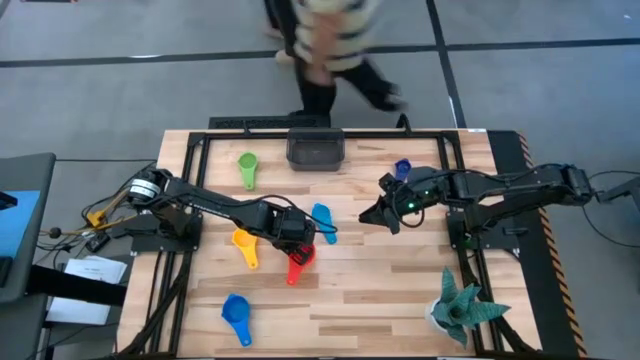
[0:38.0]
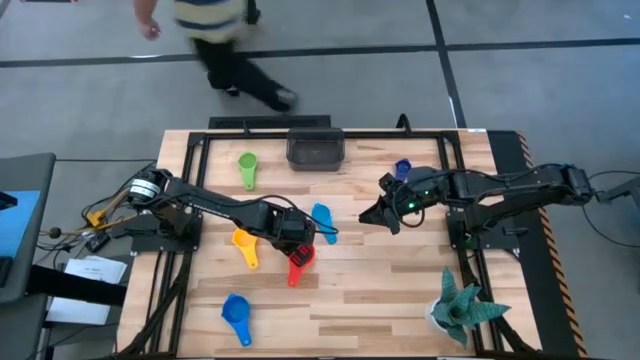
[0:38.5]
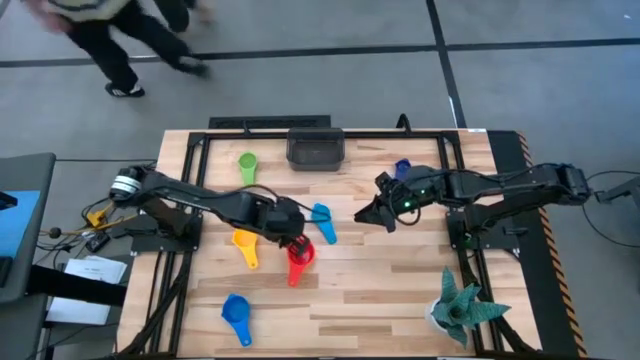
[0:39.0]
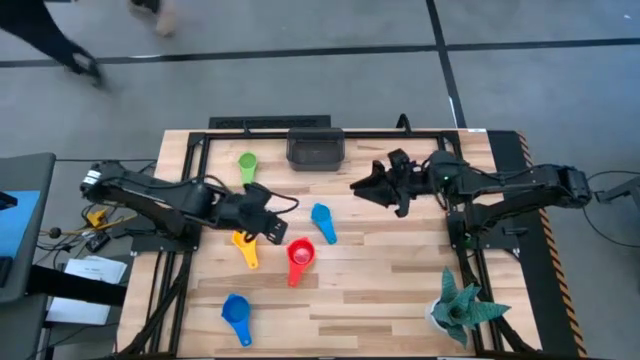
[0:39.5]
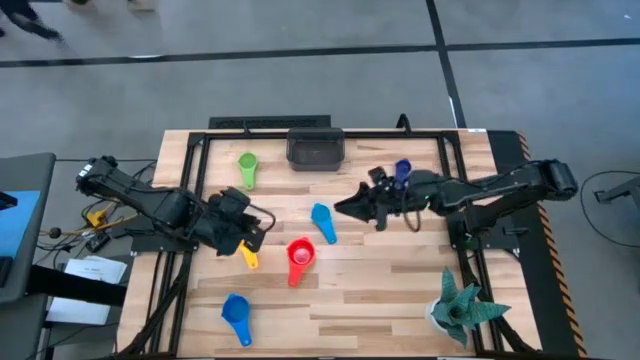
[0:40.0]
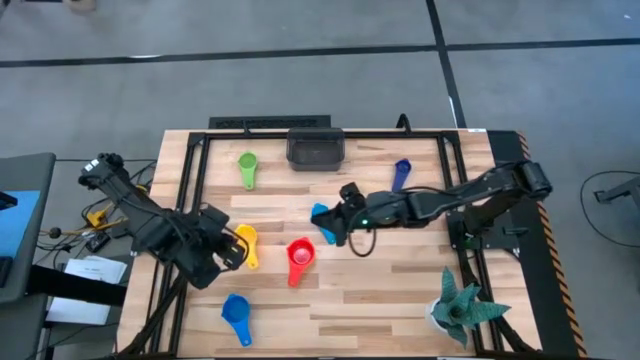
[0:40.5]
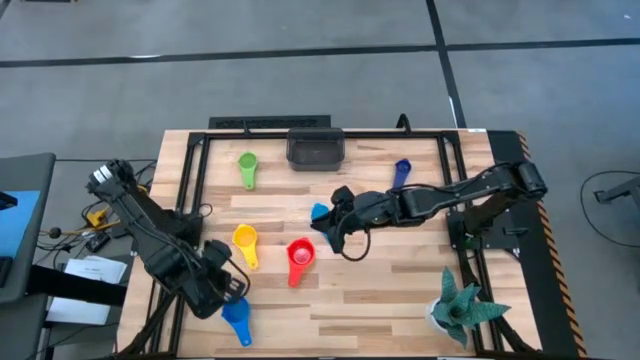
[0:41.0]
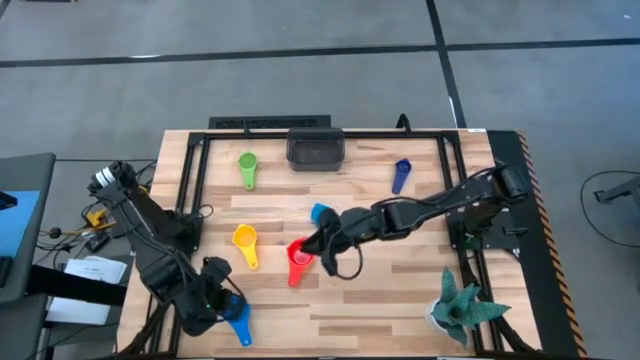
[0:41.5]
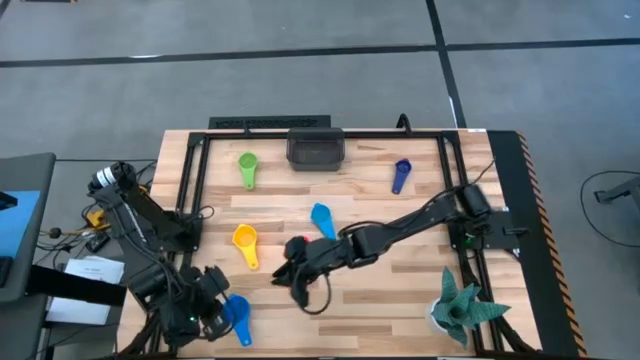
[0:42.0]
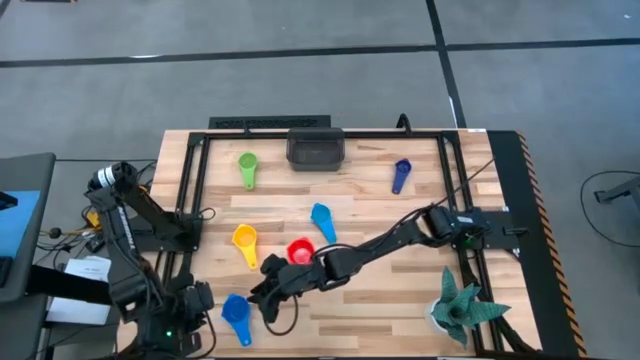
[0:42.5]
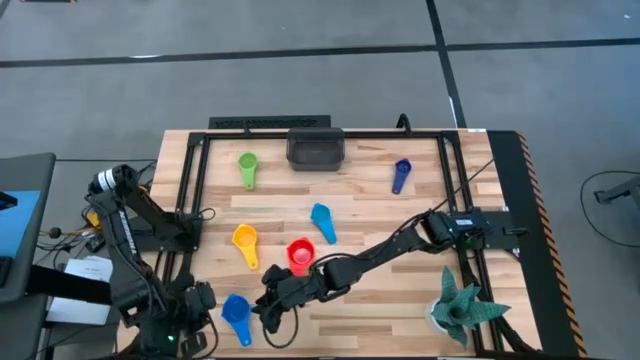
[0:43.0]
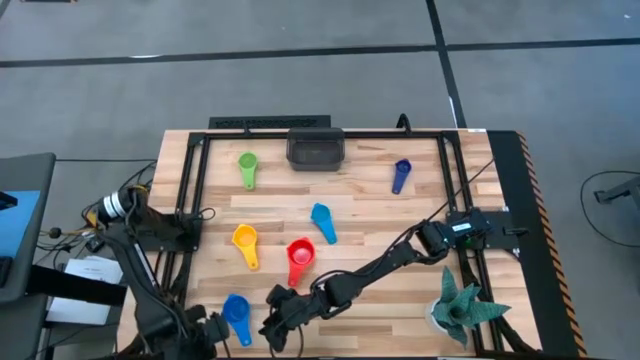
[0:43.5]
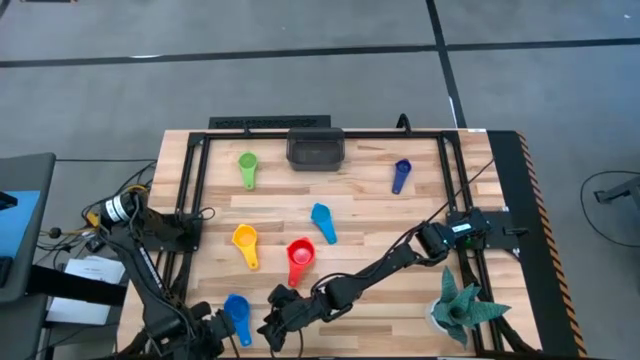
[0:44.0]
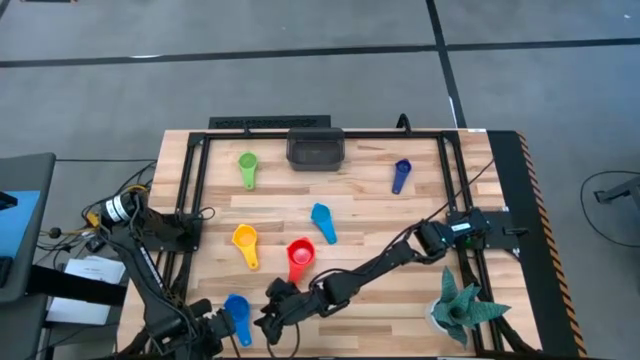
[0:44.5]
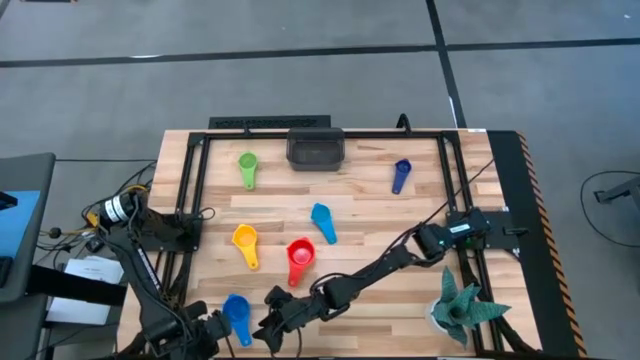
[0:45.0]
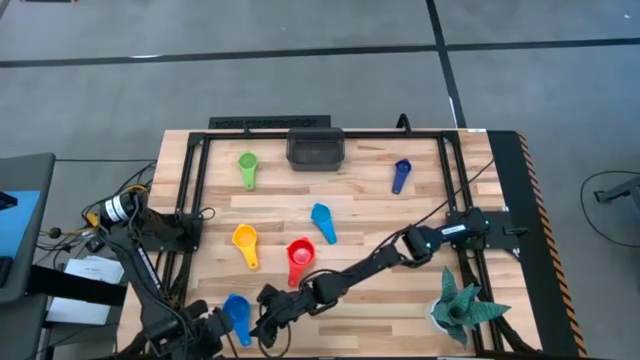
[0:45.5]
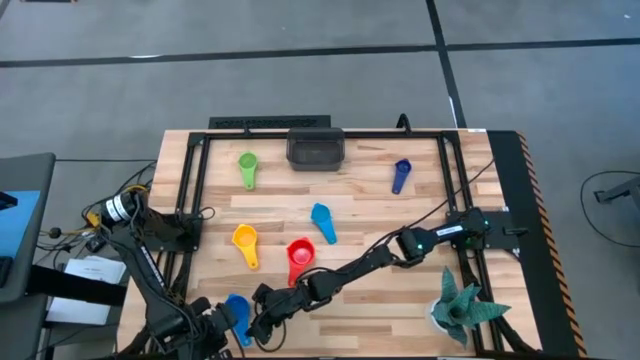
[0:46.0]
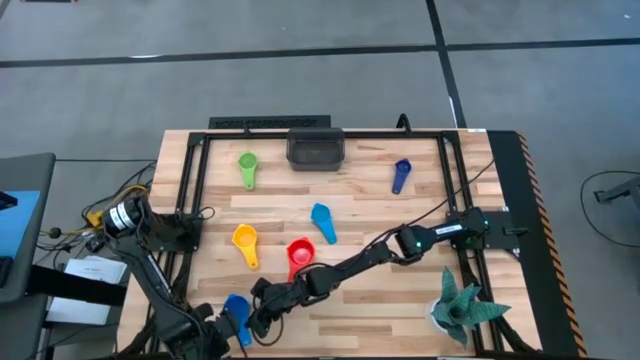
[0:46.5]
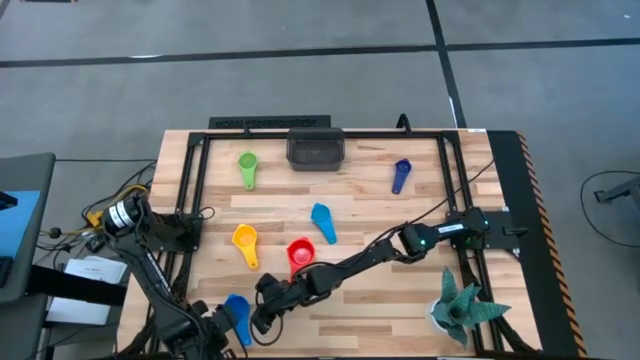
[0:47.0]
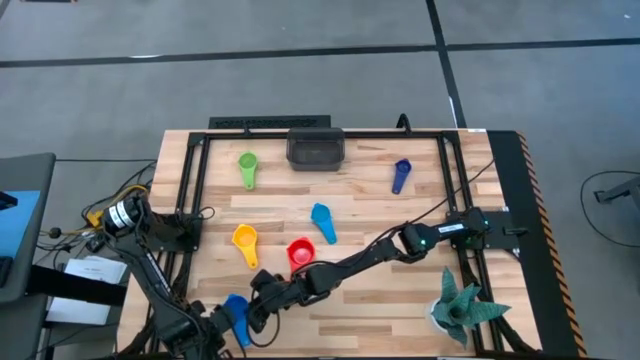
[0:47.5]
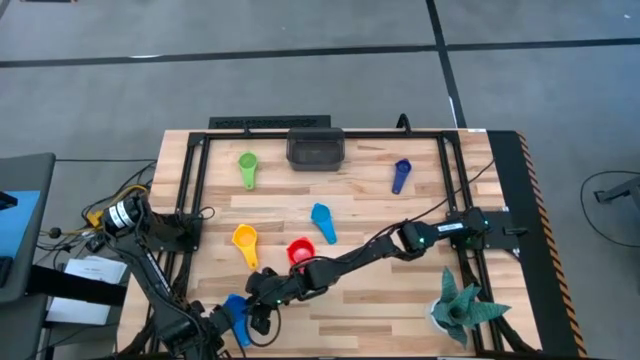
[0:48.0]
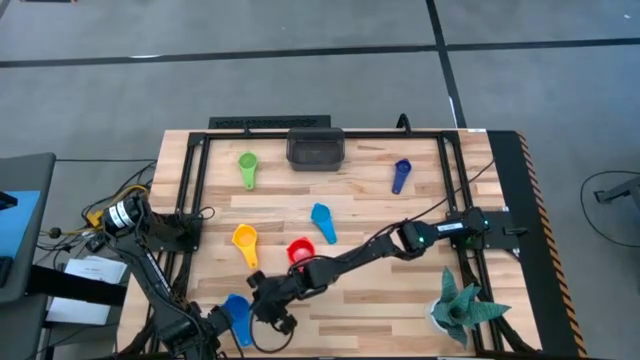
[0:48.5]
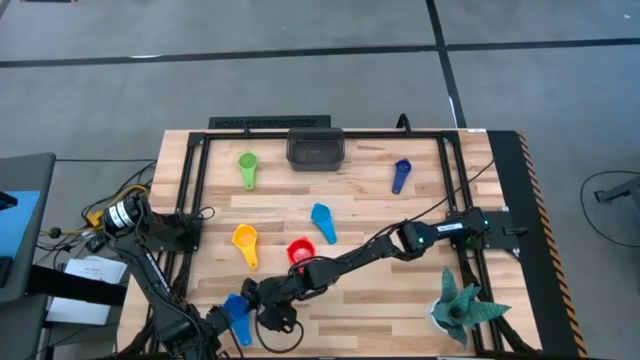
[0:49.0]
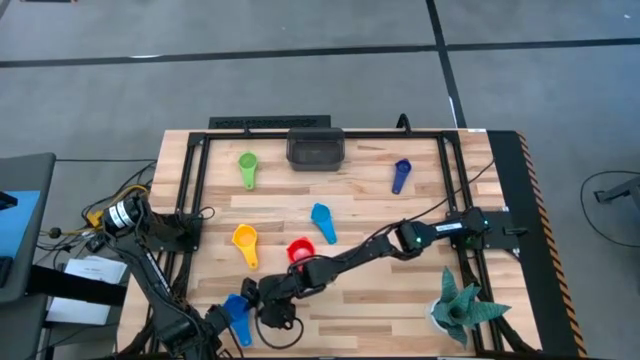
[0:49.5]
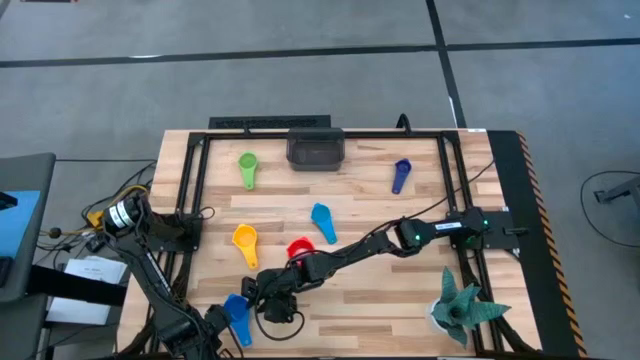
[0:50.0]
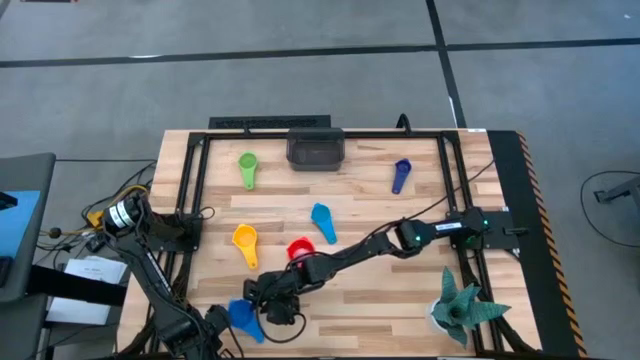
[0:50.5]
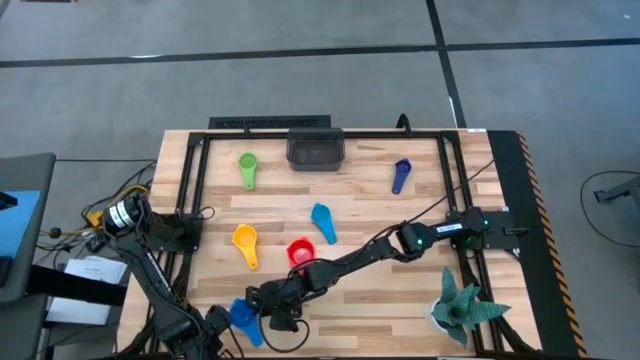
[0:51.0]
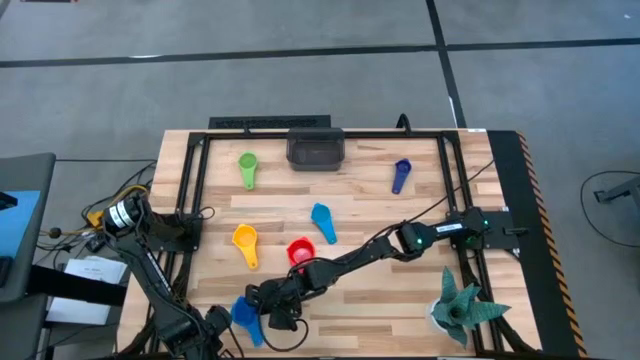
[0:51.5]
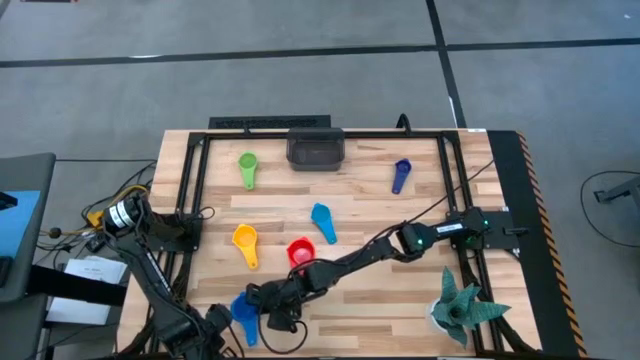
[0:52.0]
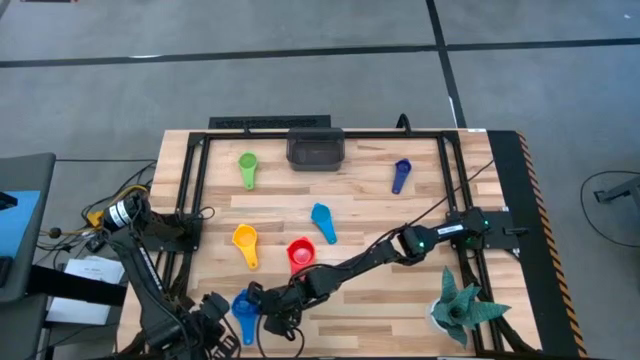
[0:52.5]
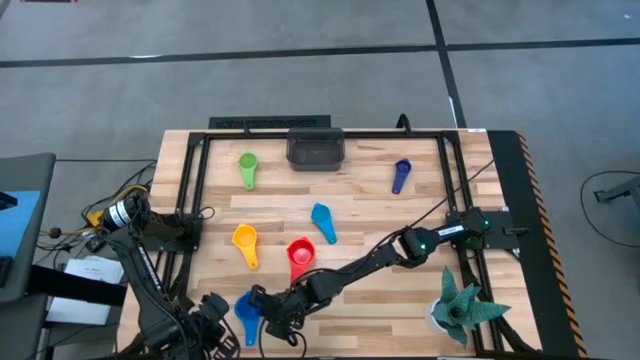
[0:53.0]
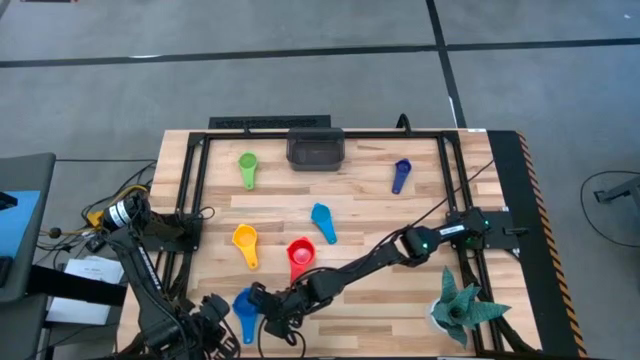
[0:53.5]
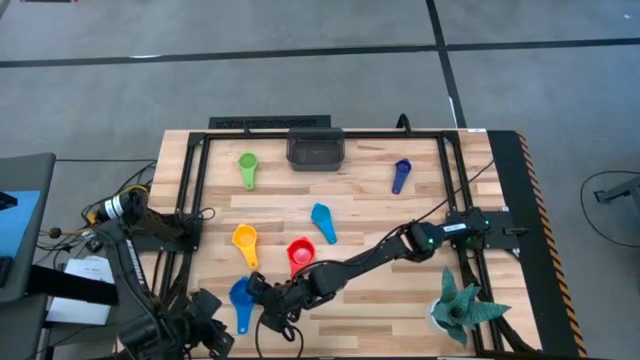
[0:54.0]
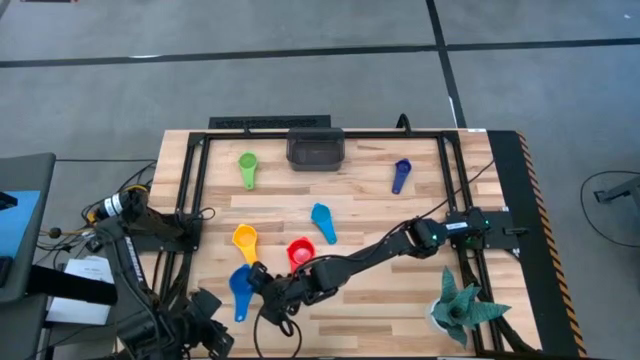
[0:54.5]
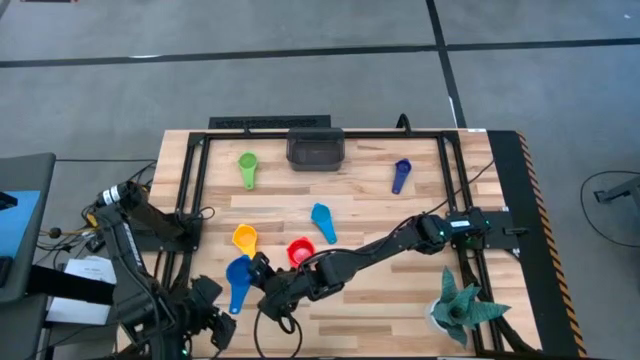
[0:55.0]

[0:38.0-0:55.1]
Task: Nest measuring cups in basket
Stack the blue measuring cup on top of the red measuring cup
